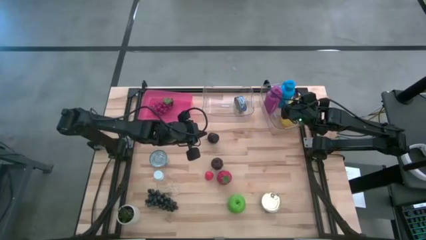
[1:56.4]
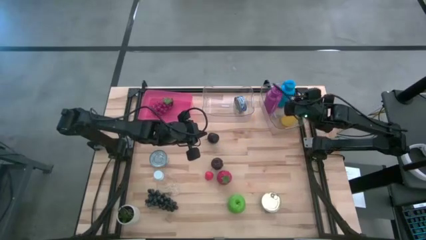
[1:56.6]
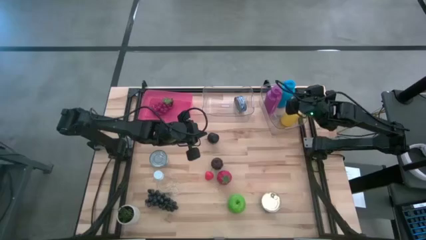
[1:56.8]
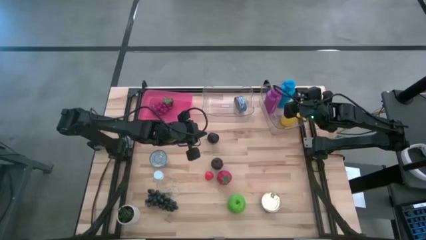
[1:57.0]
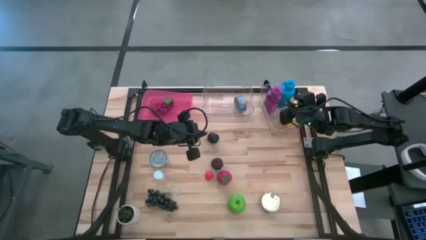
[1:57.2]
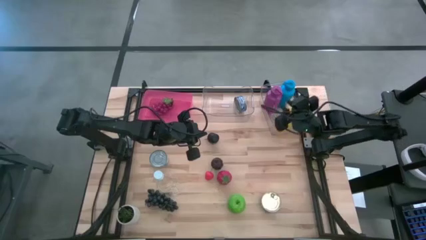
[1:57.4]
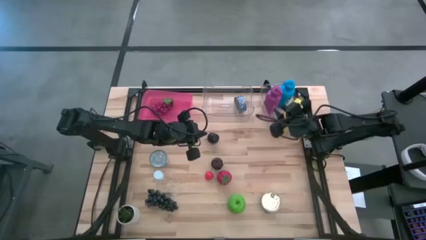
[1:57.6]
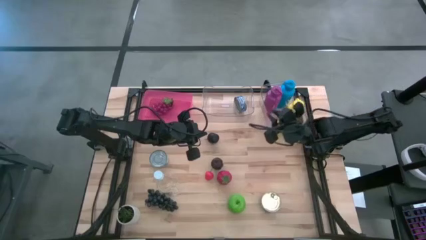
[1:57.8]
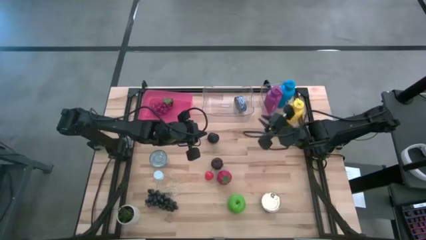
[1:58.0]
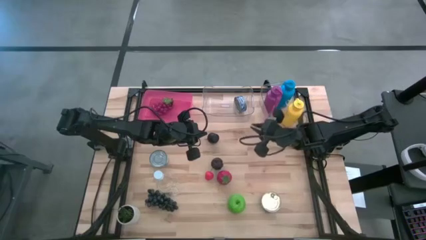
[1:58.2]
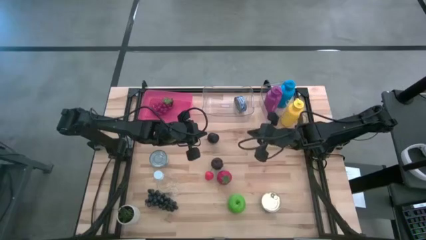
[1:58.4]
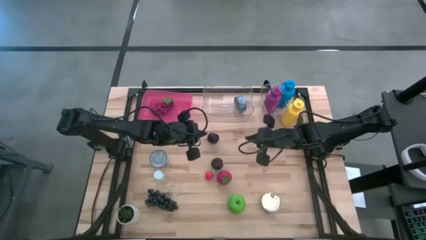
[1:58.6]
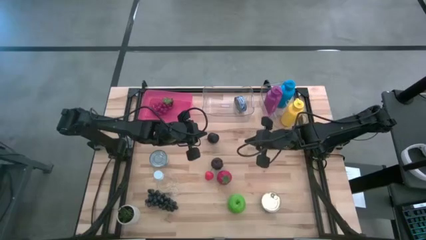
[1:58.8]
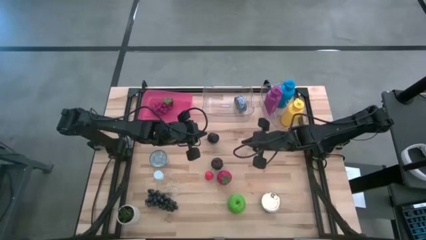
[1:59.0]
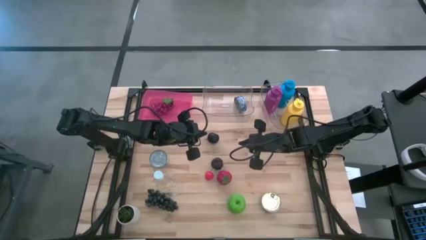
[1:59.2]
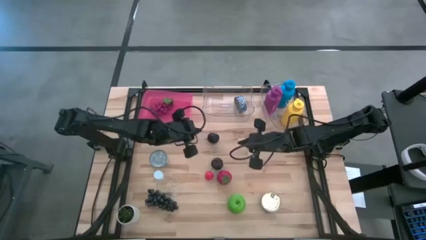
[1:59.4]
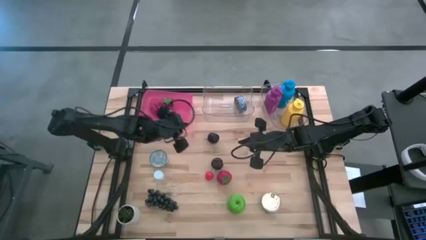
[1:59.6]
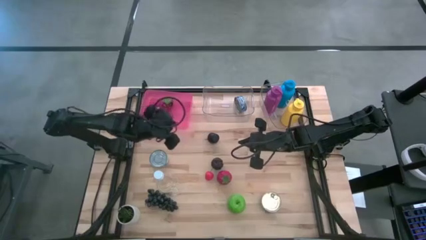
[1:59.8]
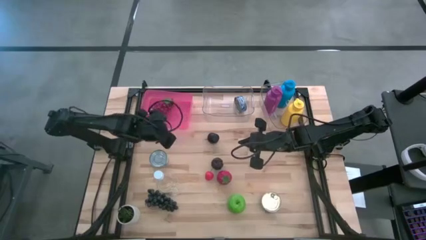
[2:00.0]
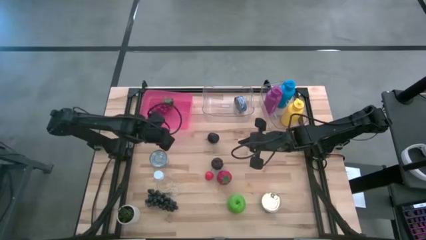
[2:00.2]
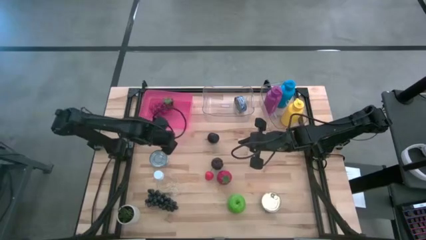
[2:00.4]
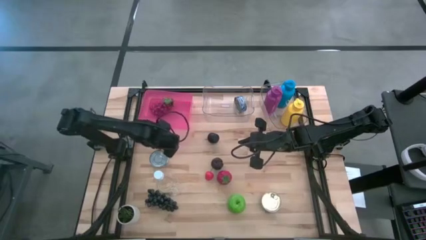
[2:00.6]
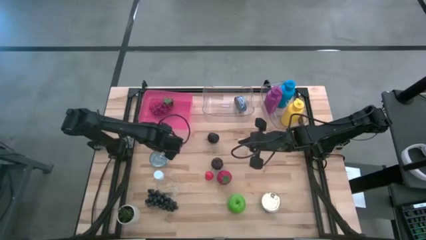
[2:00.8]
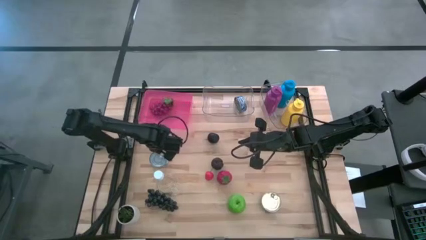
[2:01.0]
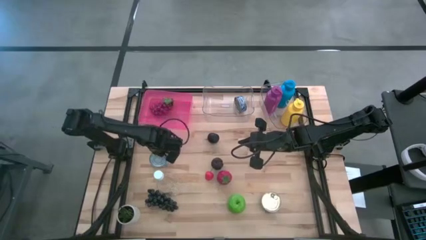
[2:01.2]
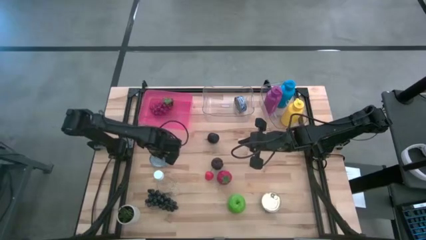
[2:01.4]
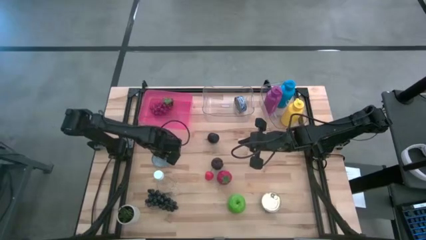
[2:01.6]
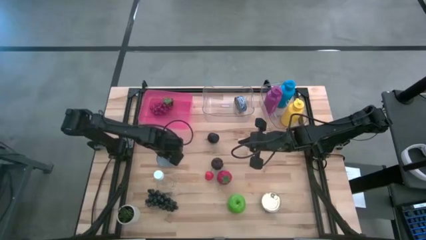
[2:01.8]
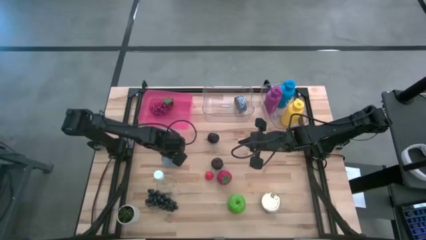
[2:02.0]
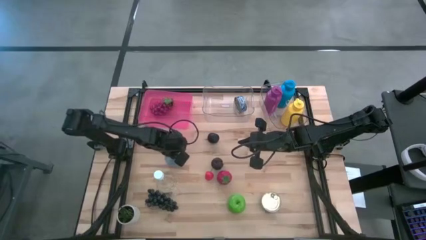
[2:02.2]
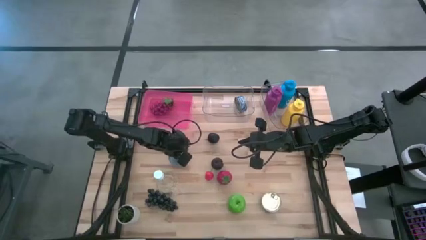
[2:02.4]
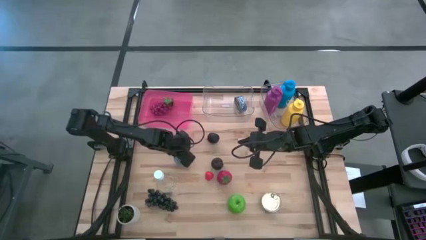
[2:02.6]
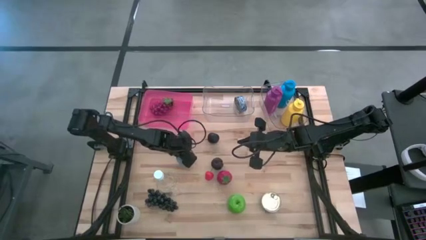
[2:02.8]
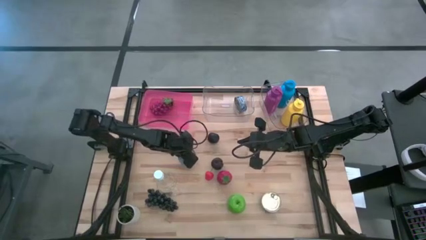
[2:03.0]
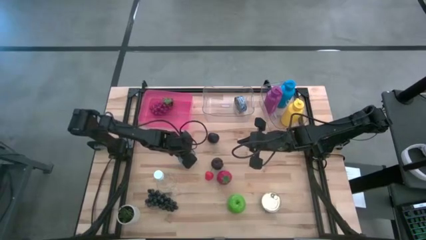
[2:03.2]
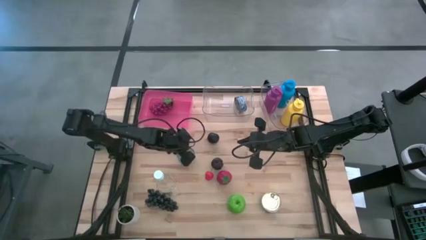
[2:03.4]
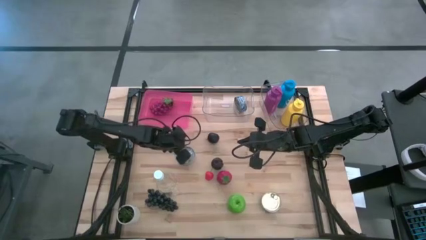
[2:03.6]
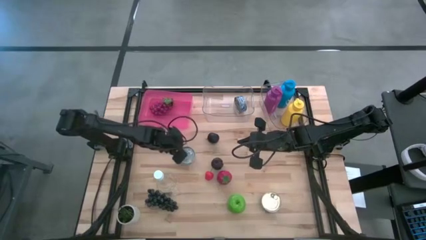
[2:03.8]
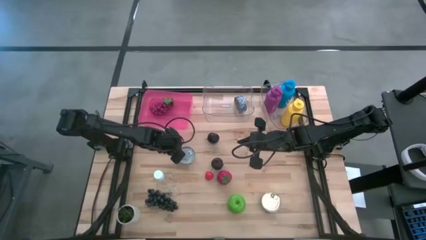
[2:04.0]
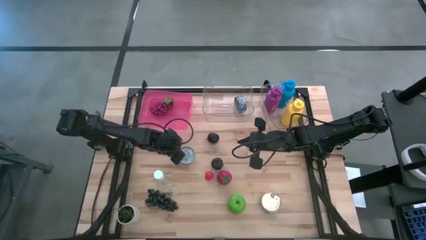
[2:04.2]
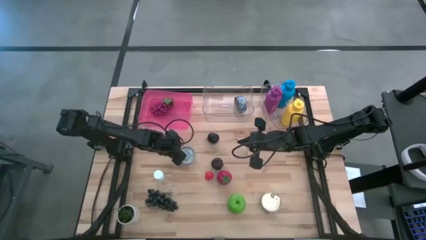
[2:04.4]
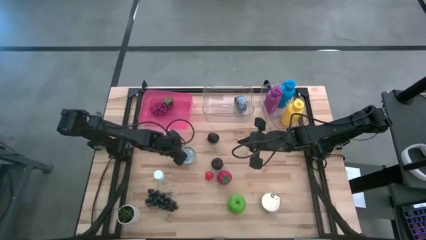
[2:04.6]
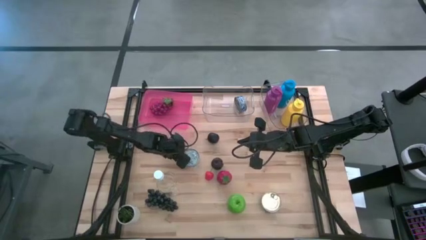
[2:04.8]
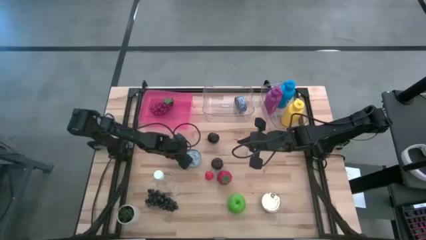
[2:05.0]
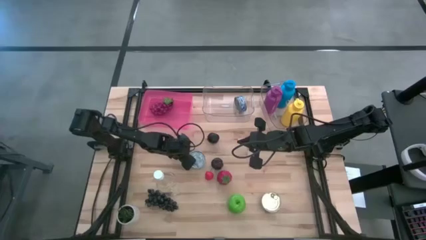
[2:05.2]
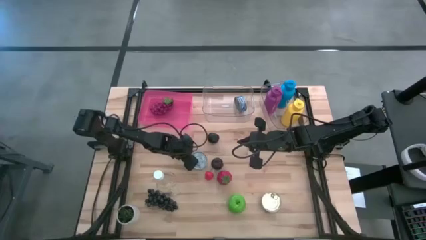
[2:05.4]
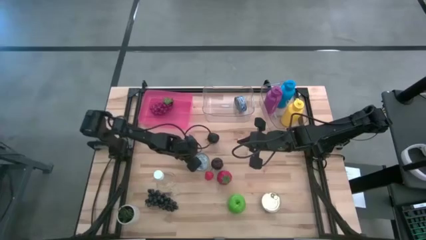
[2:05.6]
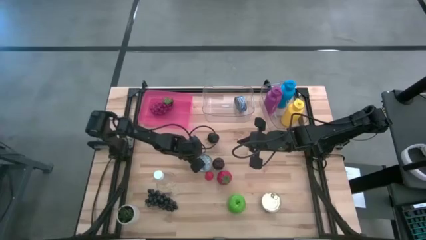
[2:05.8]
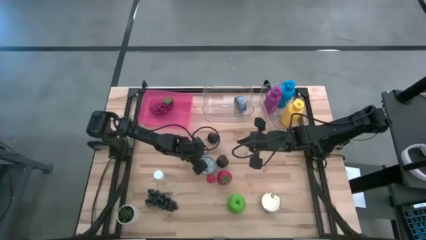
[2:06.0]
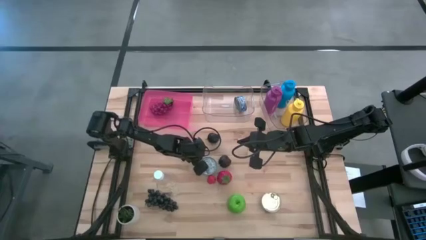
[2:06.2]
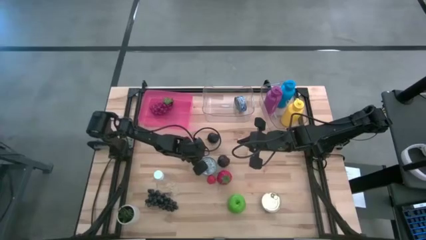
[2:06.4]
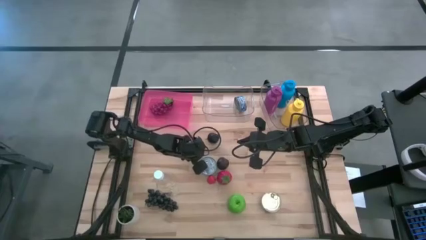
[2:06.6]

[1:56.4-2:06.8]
Task: Pick & Place Food Item
Move the light blue tuna can to the center of the table

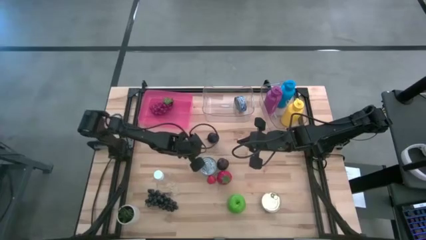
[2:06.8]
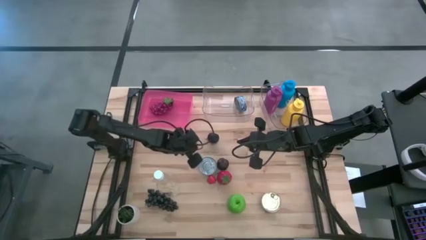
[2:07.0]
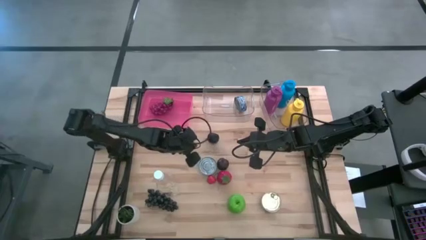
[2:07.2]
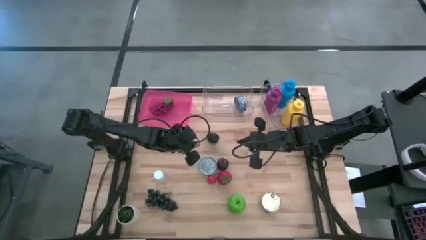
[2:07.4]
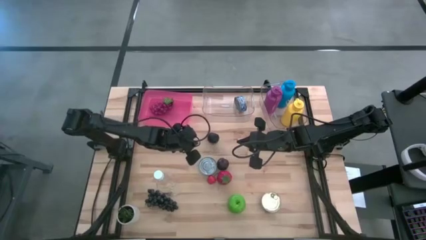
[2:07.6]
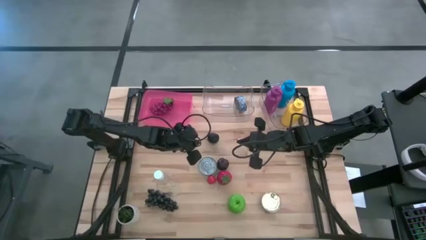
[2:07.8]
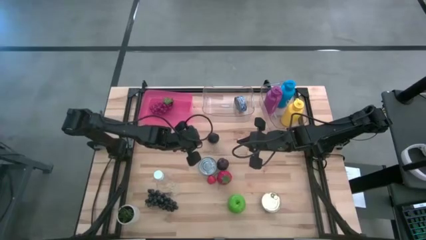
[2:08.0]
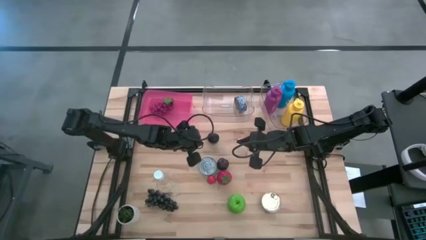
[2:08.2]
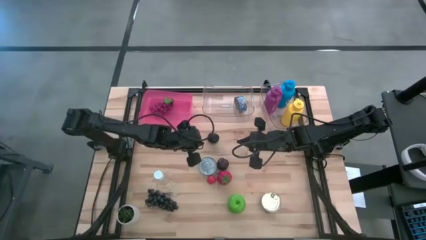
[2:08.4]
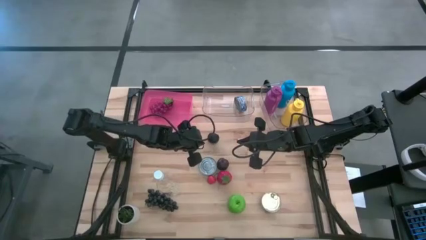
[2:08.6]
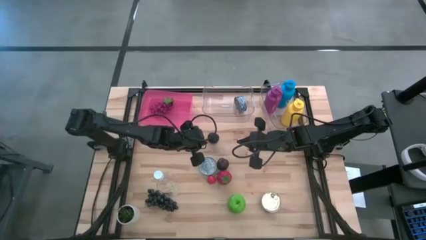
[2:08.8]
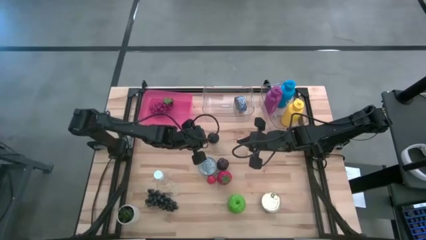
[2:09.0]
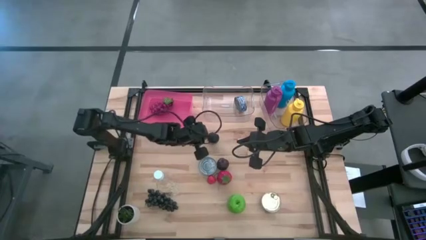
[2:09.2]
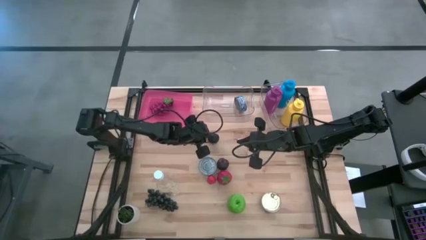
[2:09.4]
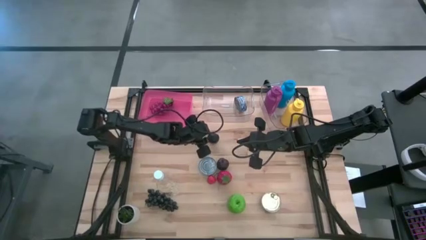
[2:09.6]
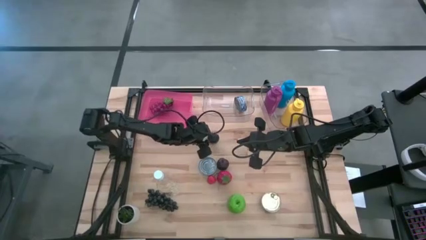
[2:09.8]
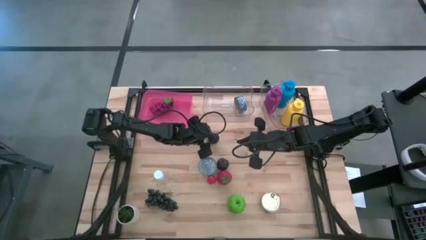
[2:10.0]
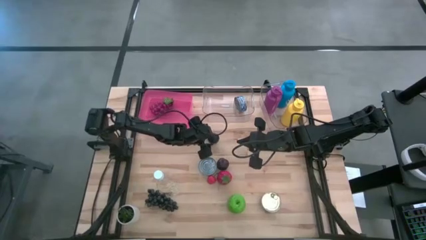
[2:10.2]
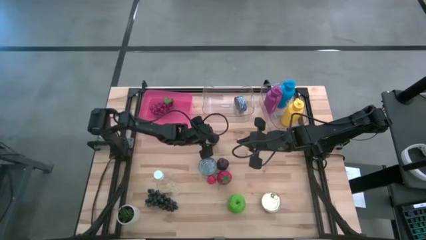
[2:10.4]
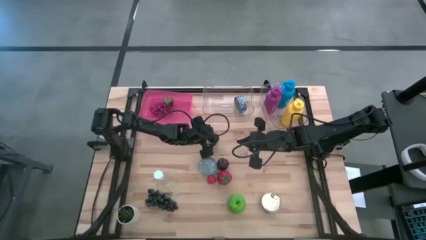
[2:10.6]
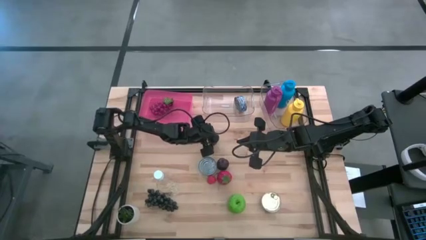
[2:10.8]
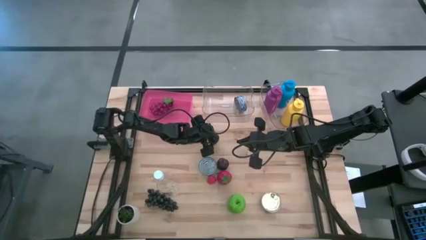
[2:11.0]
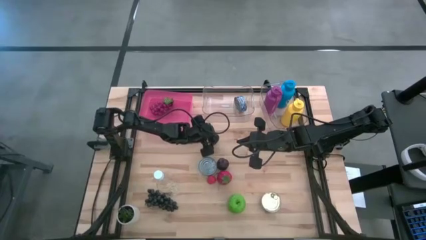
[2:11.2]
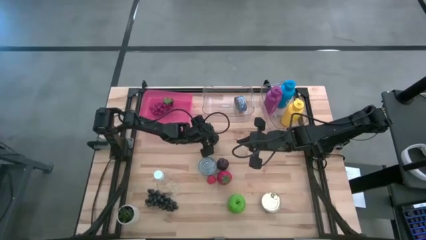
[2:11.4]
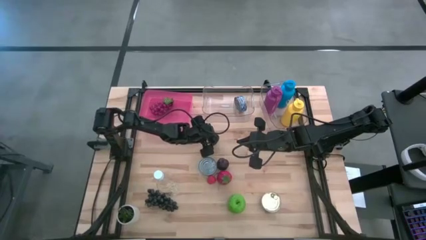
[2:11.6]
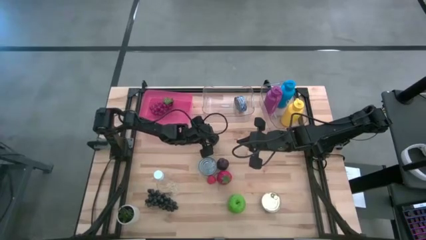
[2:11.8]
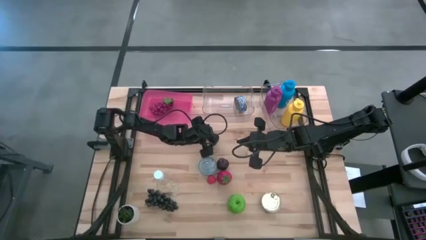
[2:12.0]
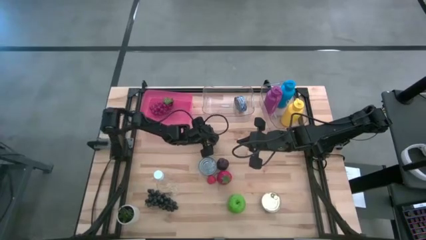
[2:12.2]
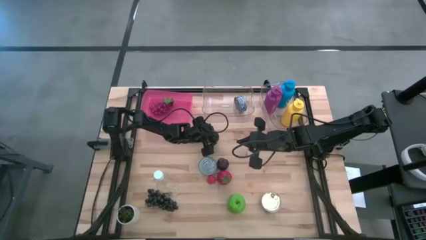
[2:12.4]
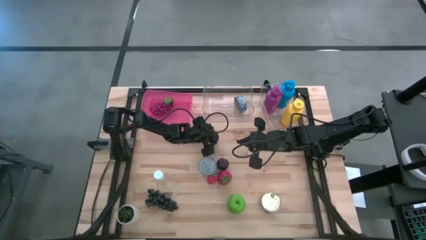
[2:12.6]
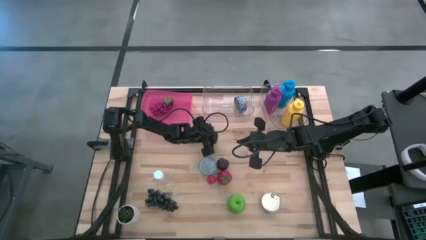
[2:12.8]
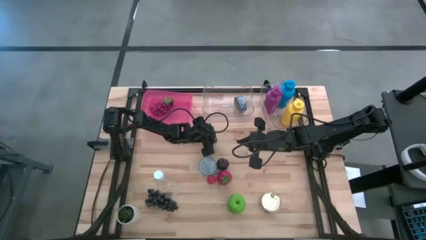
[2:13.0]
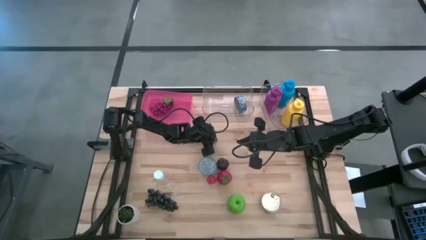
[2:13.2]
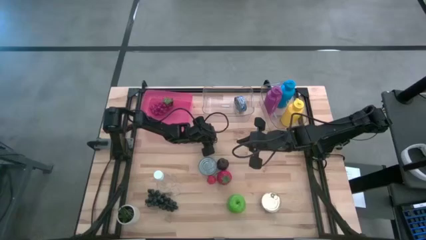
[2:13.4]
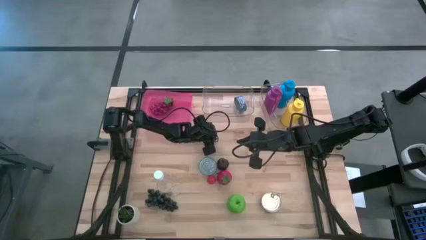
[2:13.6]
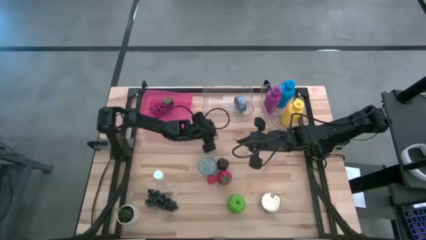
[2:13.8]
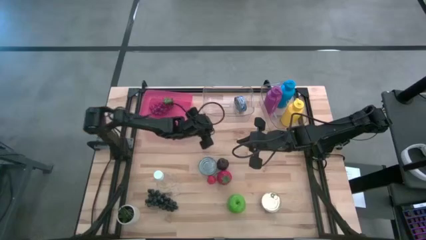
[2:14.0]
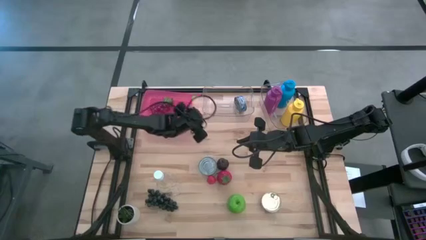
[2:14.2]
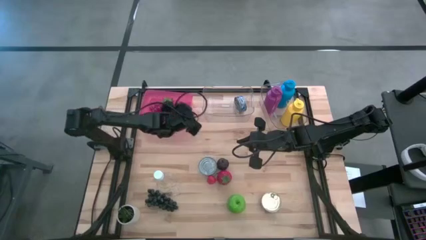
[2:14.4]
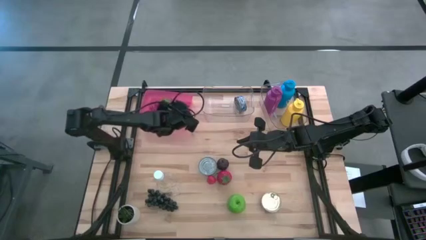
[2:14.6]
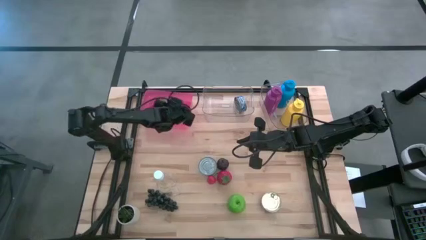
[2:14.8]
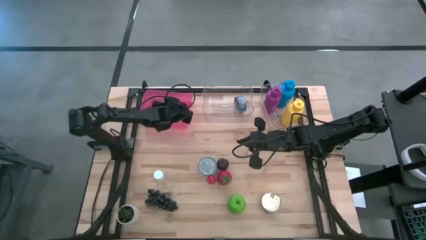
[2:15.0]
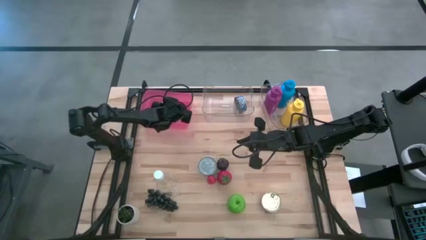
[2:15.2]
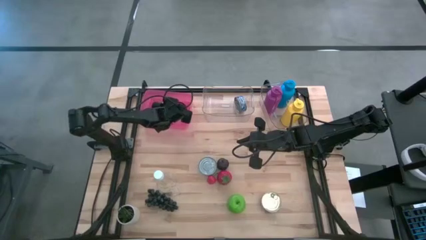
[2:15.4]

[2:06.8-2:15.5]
Put the top plum into the pink bin
